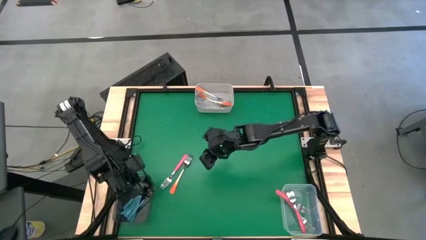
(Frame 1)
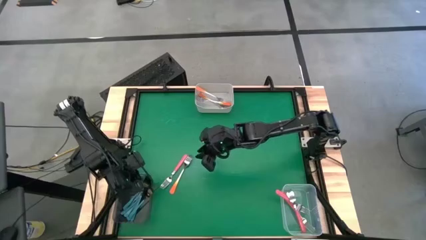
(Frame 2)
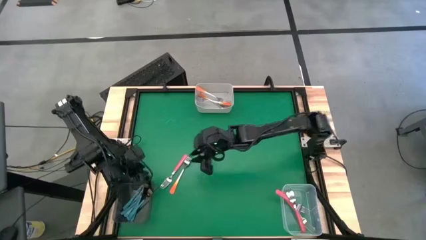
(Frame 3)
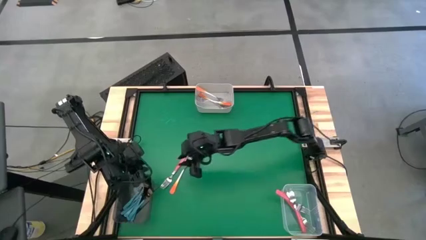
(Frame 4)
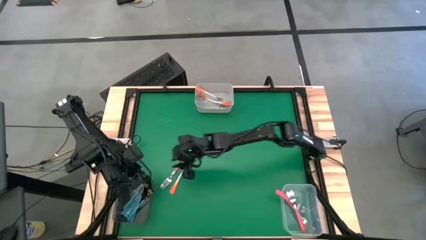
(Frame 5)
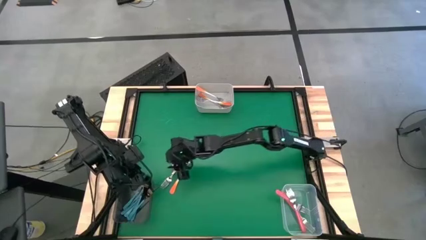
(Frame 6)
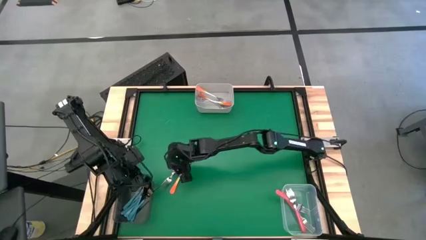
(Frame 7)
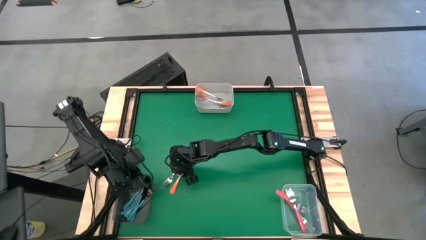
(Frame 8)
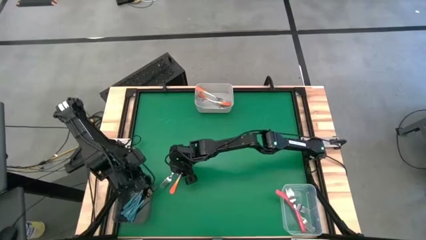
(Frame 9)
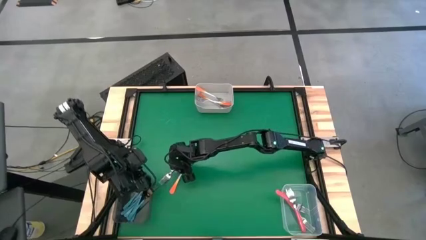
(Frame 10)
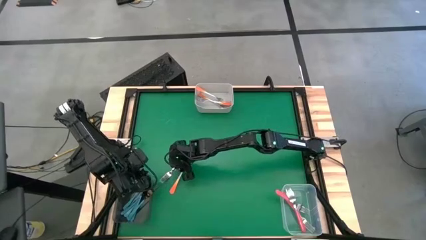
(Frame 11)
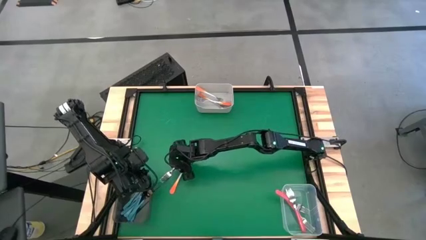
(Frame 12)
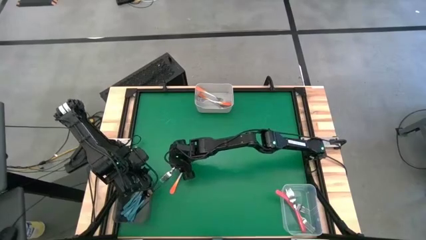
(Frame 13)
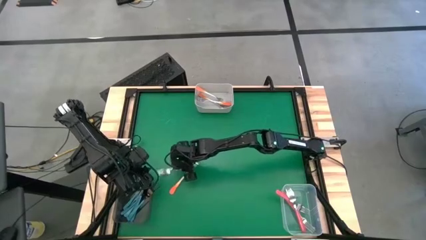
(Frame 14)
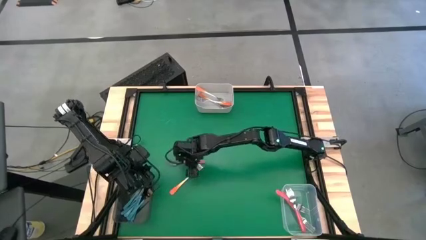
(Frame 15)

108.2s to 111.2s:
Task: Sort silverware by color (type)
Put the pink fork into the transparent bin

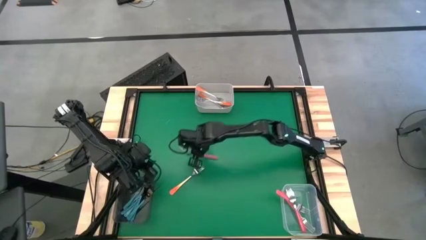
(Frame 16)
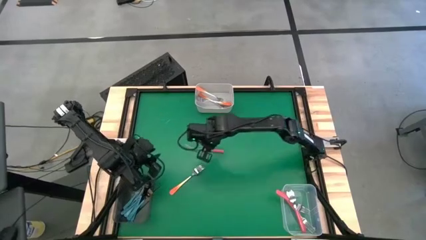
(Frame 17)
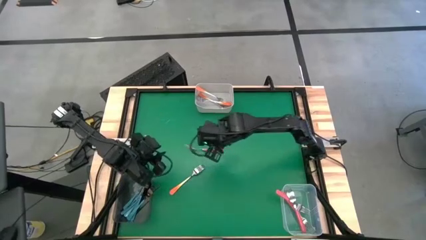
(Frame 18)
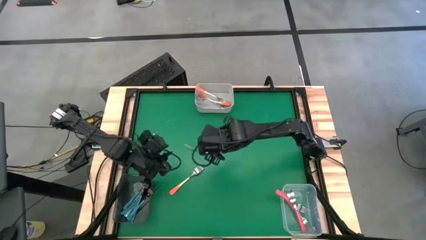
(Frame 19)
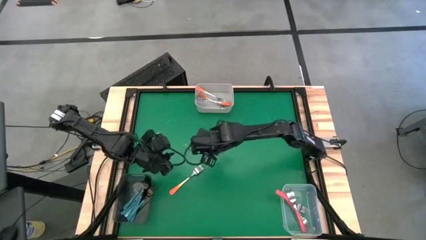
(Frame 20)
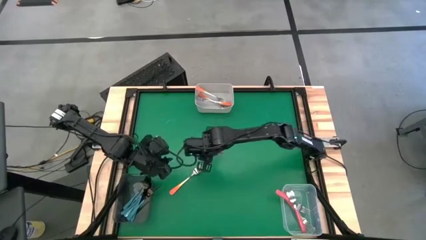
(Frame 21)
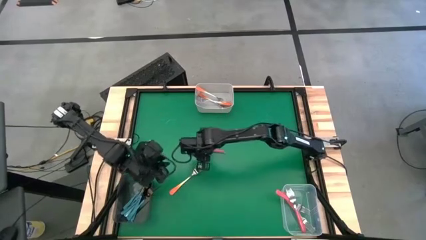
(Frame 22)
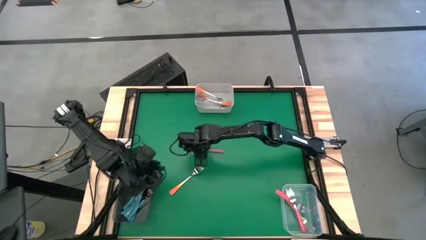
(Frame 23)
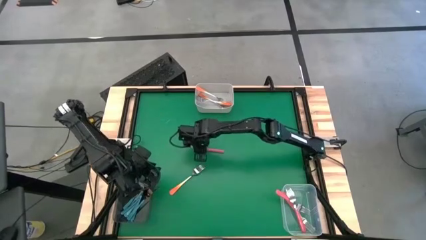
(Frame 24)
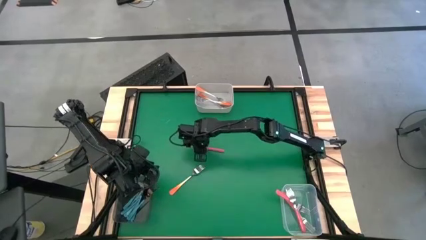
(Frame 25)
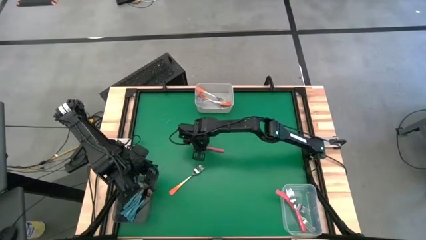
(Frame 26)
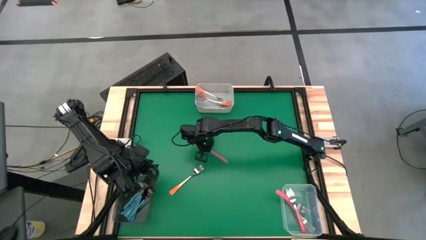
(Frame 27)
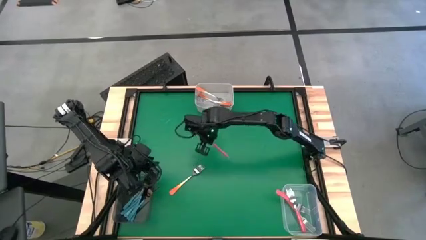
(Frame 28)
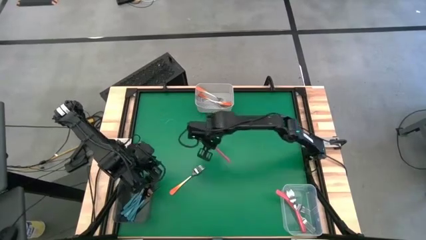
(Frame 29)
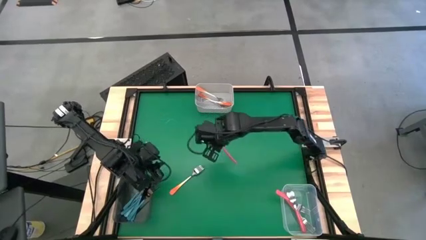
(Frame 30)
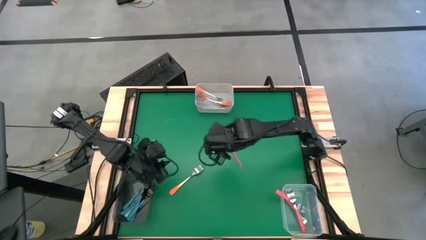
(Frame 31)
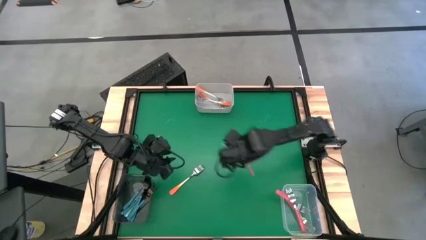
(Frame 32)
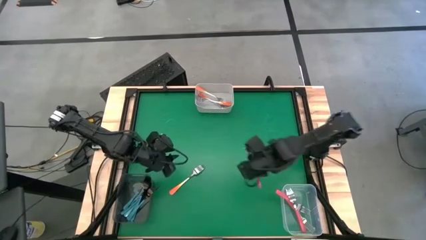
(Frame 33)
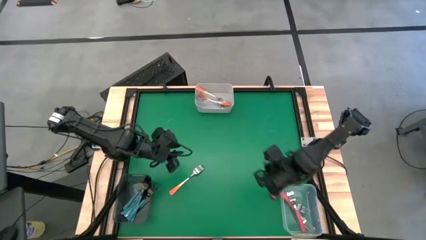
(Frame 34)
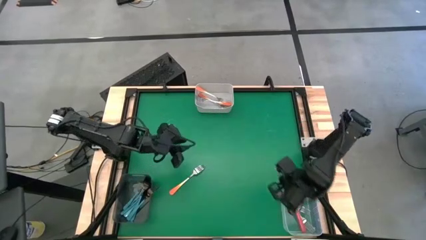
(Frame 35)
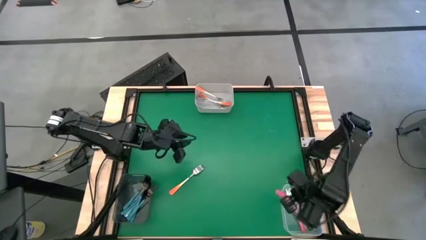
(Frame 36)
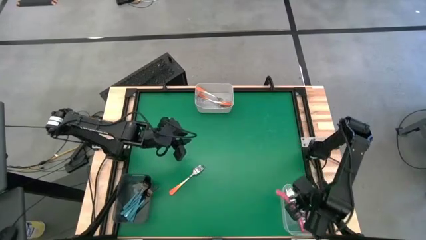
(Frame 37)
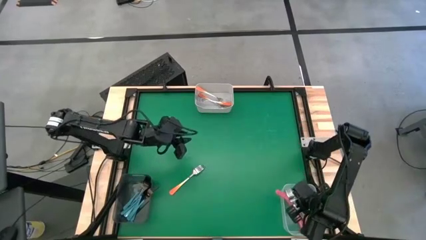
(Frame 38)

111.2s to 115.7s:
Put the pink fork into the transparent bin

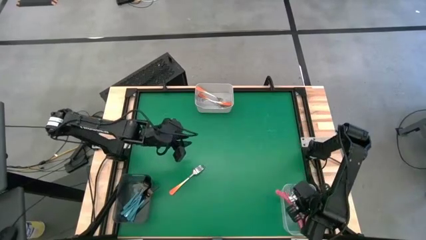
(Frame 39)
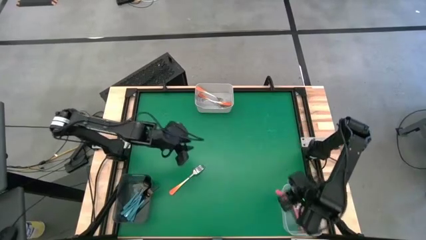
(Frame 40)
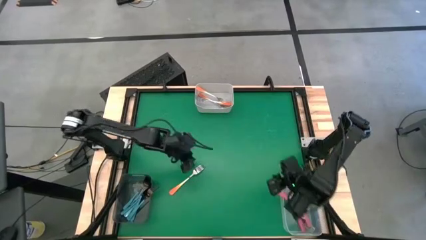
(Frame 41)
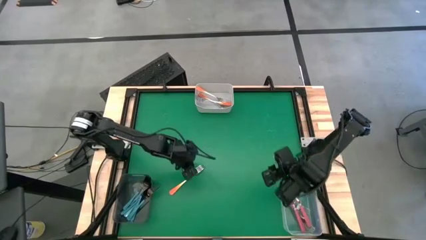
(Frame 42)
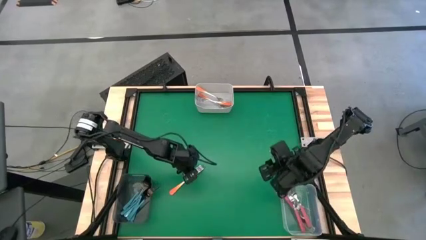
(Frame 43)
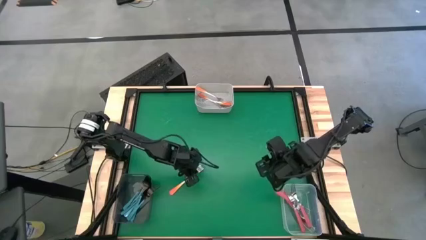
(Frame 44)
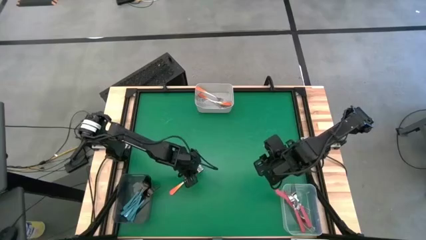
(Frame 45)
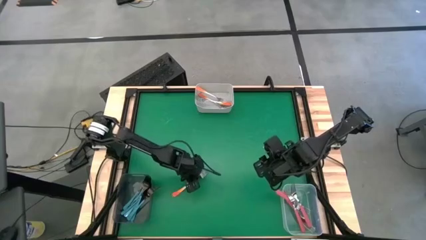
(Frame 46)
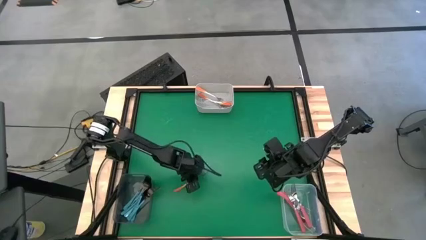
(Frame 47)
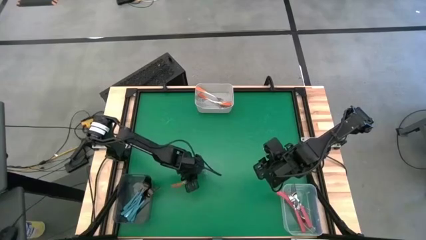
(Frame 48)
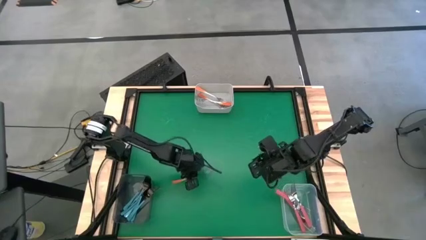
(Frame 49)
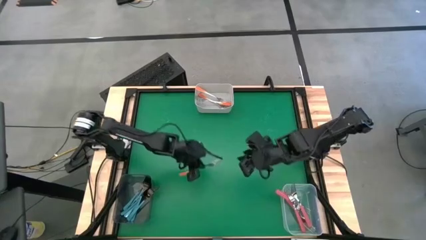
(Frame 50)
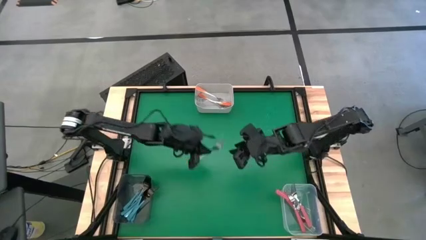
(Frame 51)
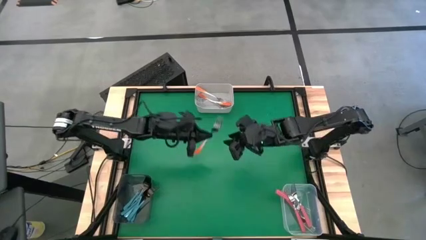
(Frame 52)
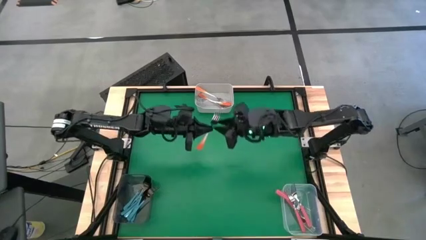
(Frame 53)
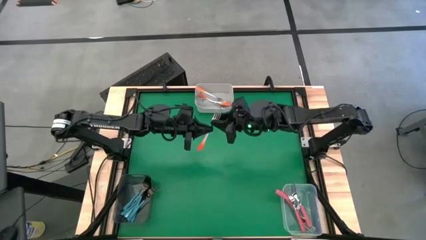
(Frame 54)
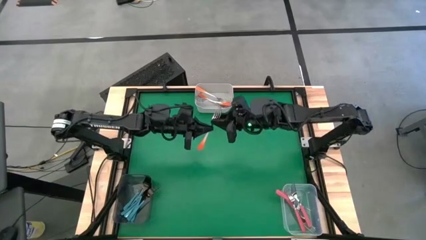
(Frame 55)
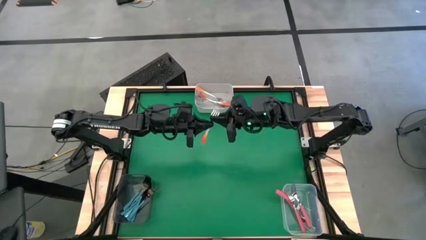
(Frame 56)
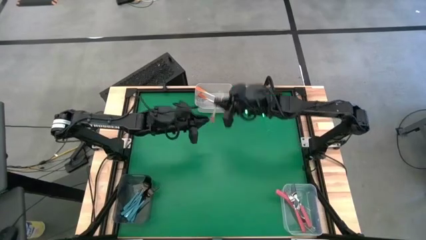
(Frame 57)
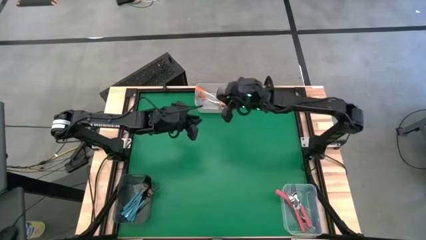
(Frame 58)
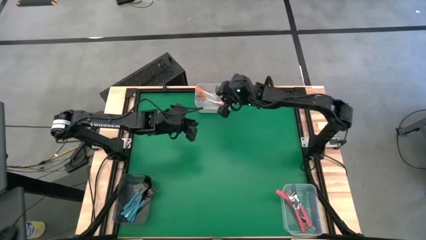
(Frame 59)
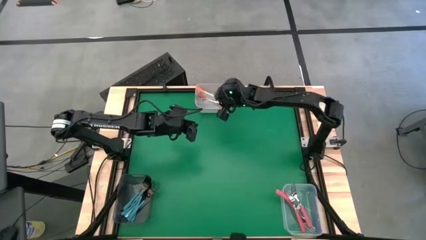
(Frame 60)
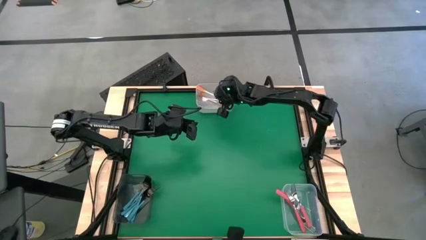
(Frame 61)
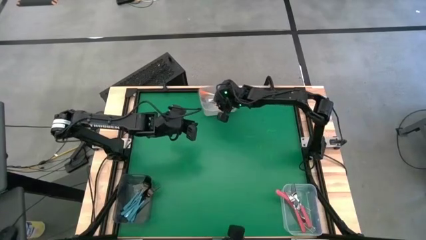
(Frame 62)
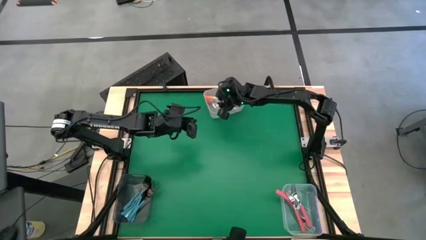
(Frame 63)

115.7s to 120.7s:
Put the orange fork into the white bin
